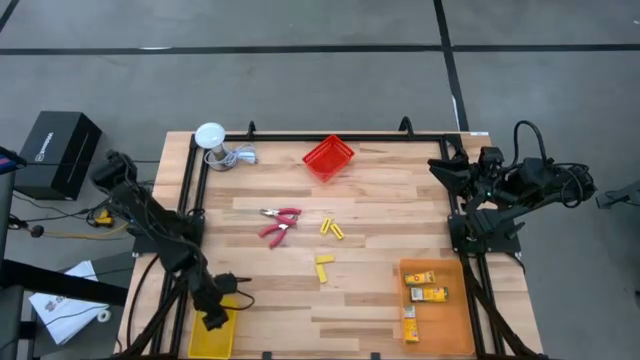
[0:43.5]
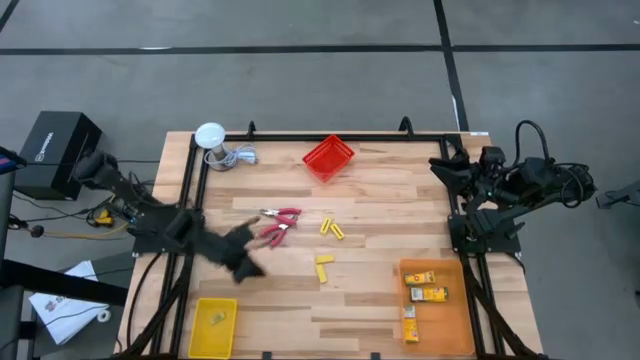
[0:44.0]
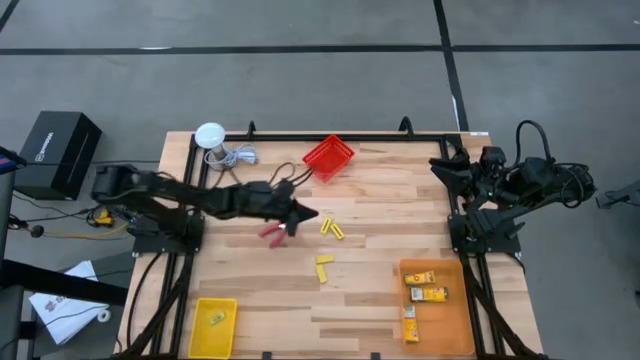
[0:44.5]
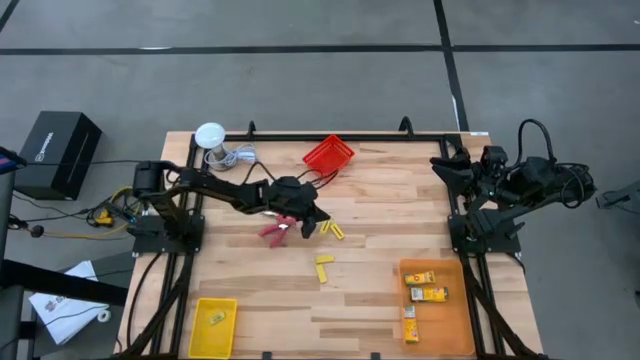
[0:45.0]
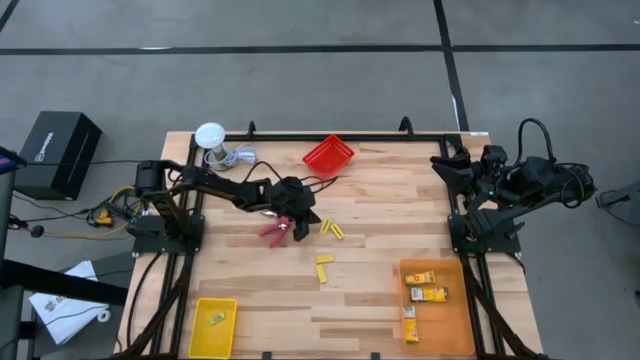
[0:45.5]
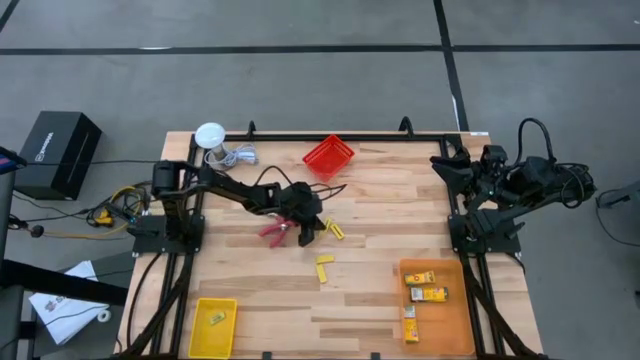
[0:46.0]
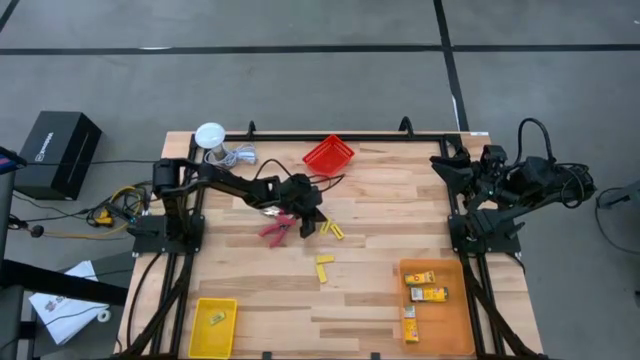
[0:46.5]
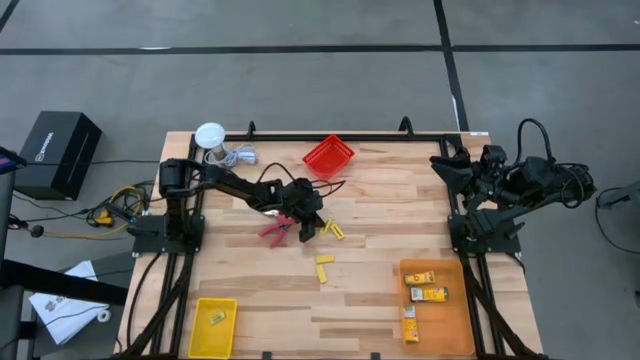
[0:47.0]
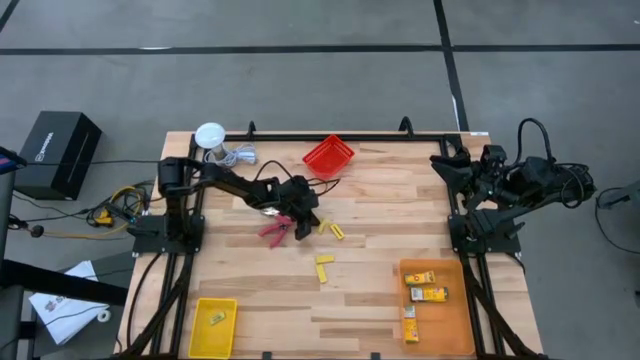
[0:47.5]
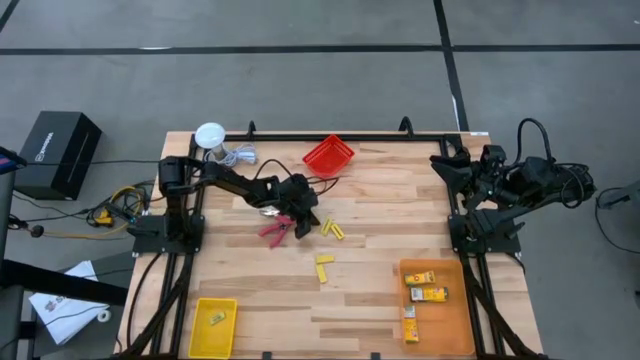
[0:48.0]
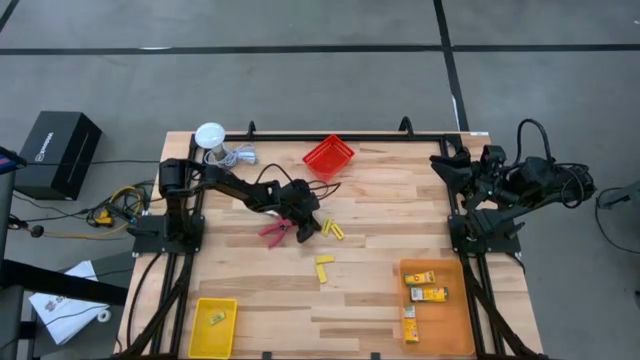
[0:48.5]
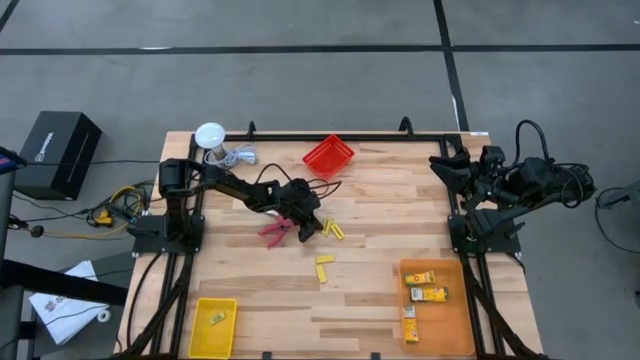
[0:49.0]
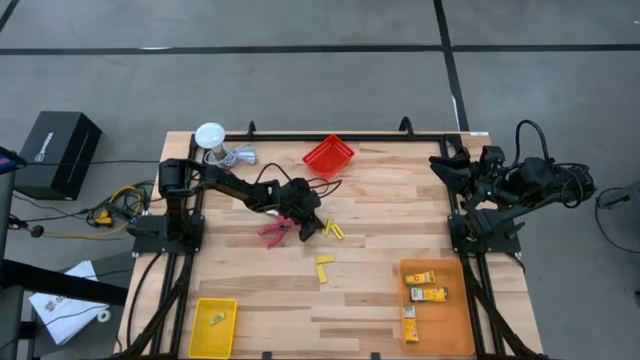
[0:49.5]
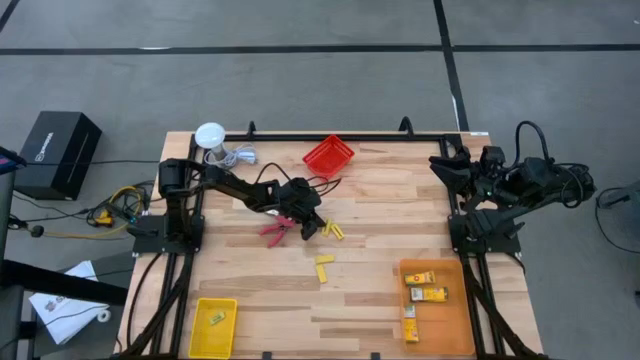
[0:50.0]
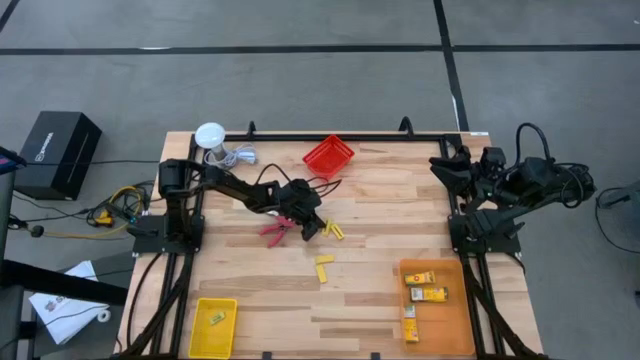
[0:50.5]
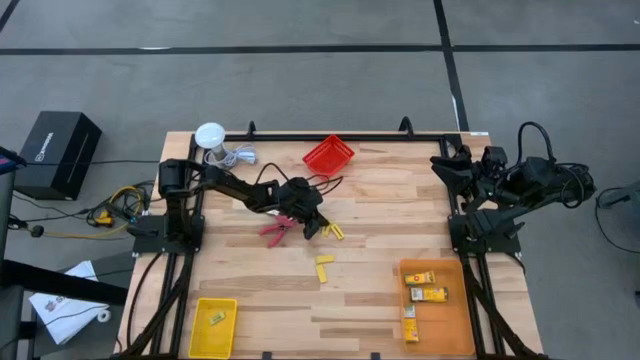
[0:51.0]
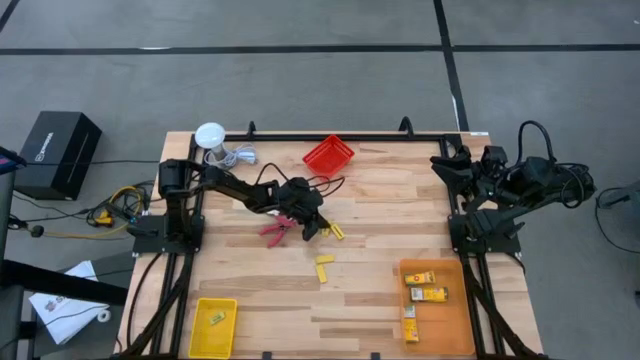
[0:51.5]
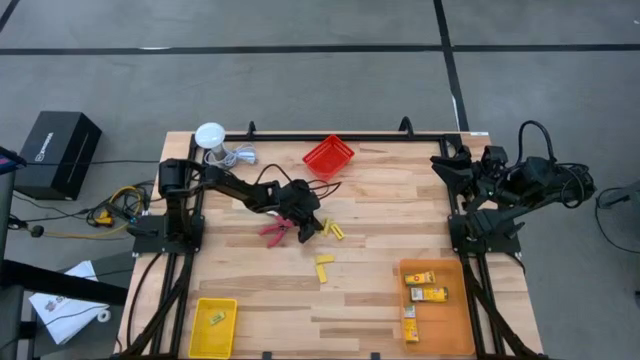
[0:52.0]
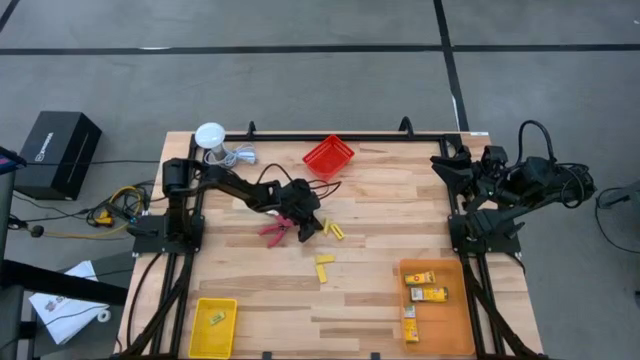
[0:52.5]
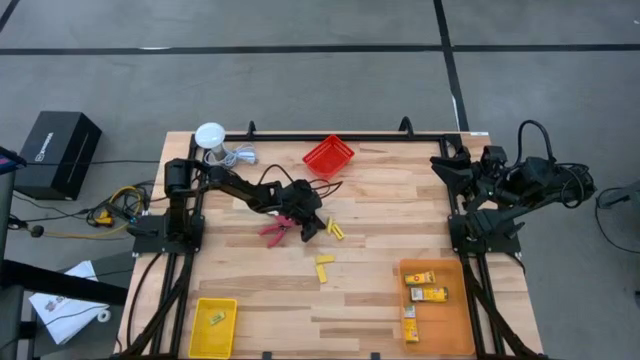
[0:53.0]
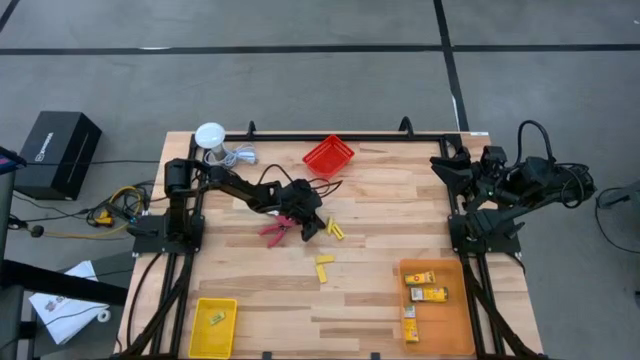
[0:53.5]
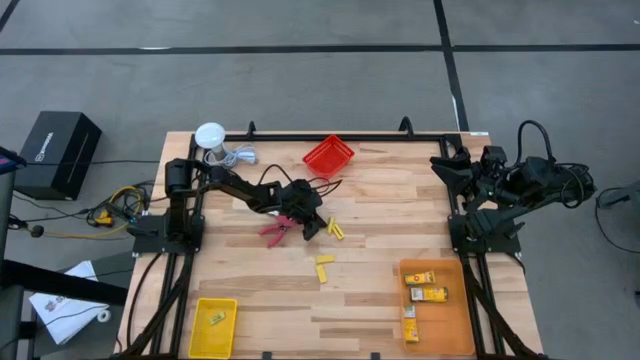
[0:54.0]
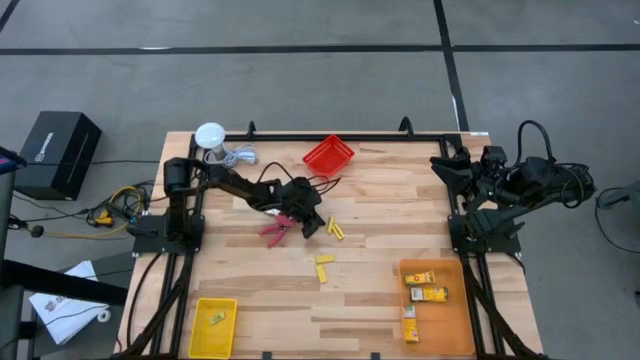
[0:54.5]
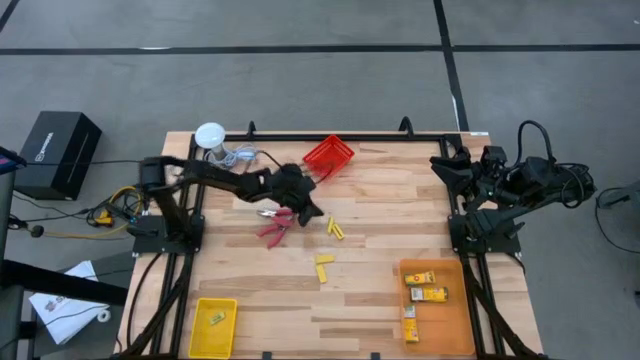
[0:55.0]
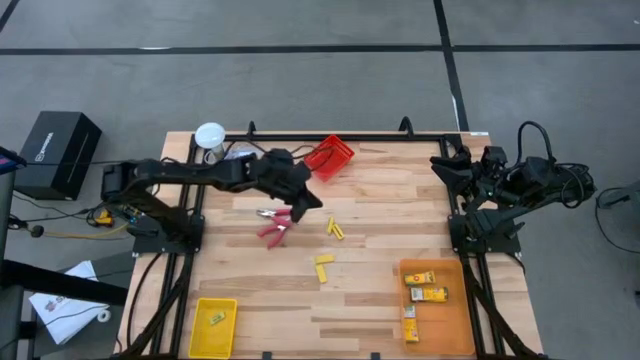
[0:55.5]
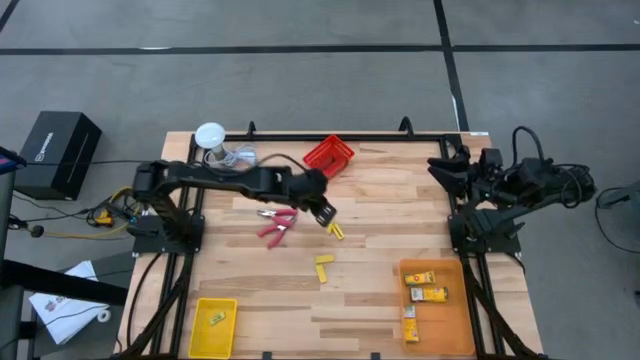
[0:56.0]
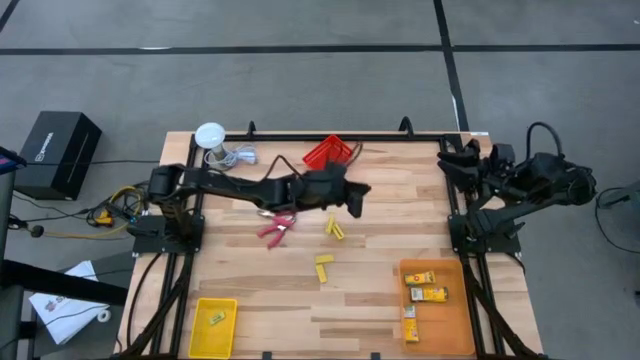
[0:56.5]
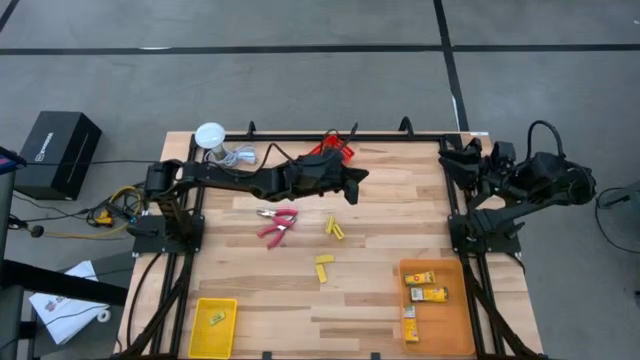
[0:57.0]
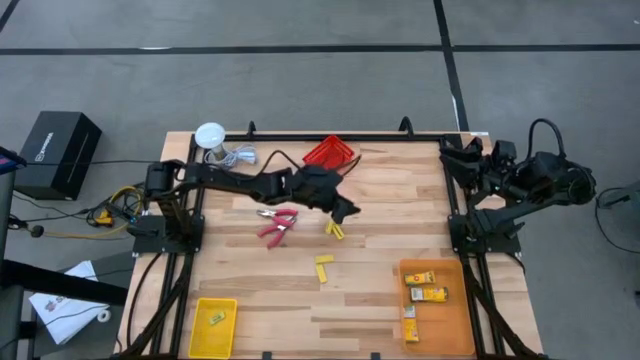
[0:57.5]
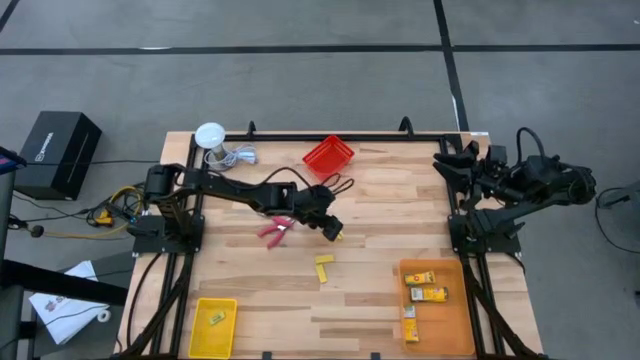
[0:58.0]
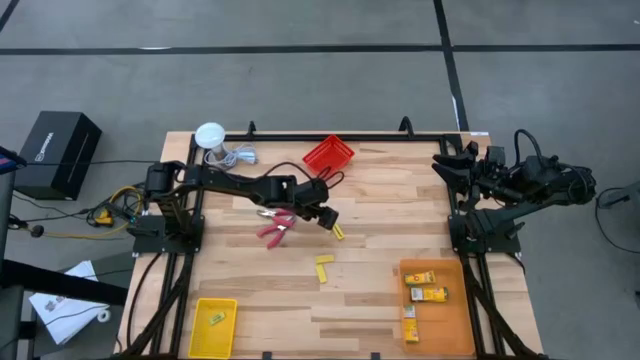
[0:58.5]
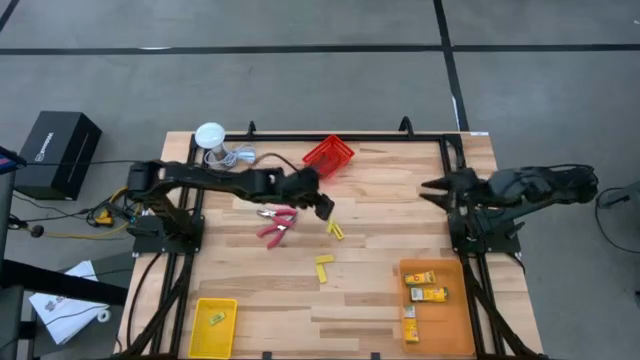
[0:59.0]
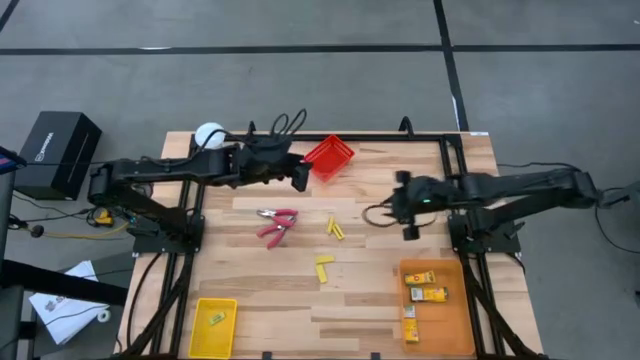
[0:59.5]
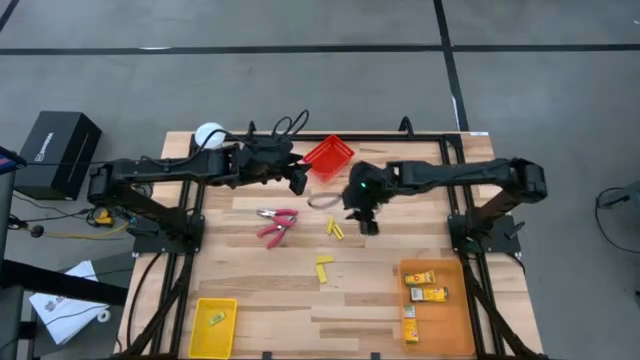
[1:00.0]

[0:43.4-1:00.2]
Task: Pick & Place School Supplies
Put the yellow eraser into the yellow bin

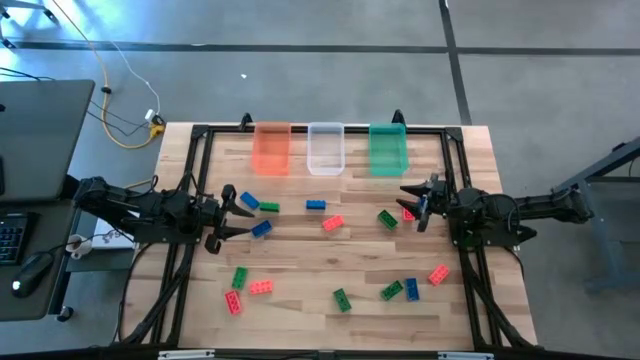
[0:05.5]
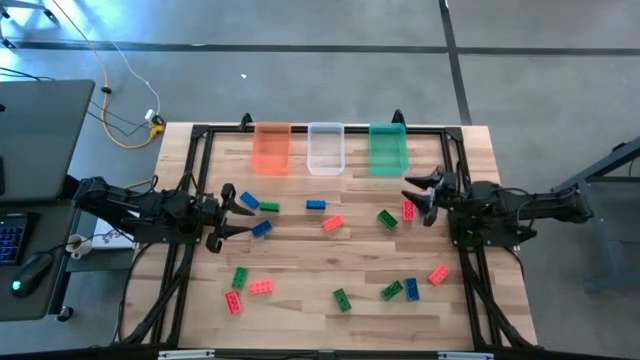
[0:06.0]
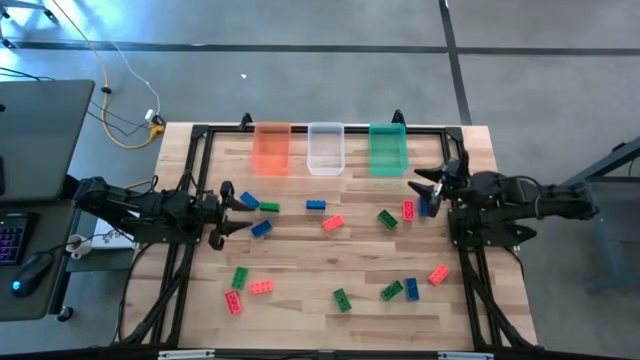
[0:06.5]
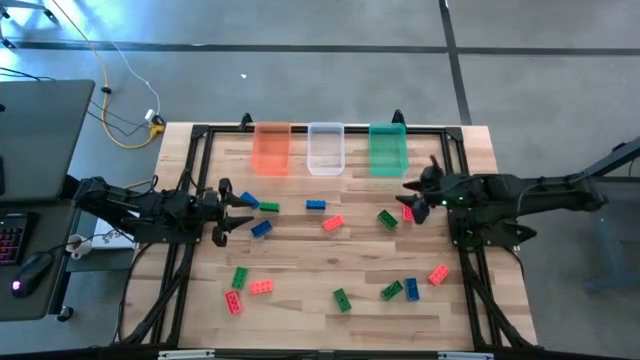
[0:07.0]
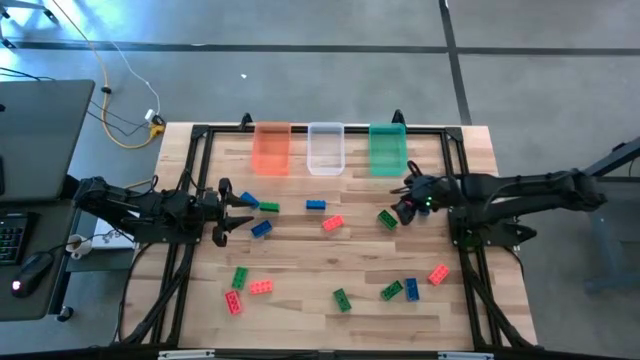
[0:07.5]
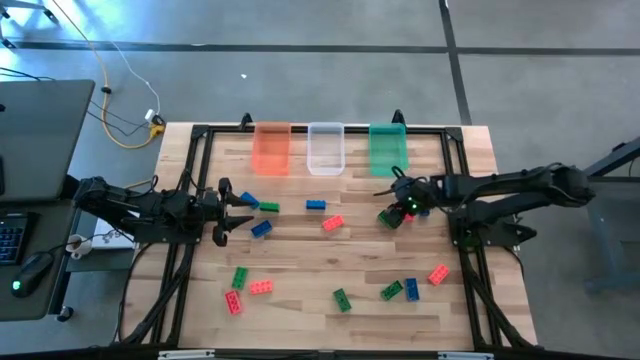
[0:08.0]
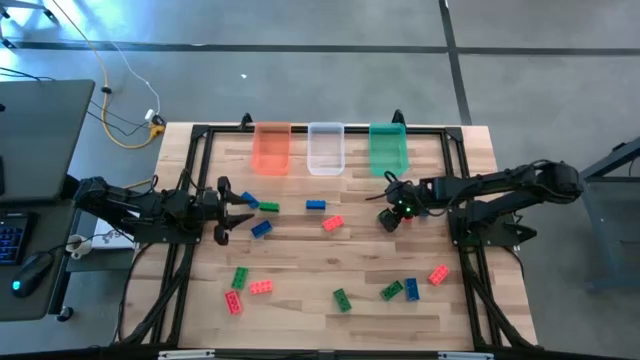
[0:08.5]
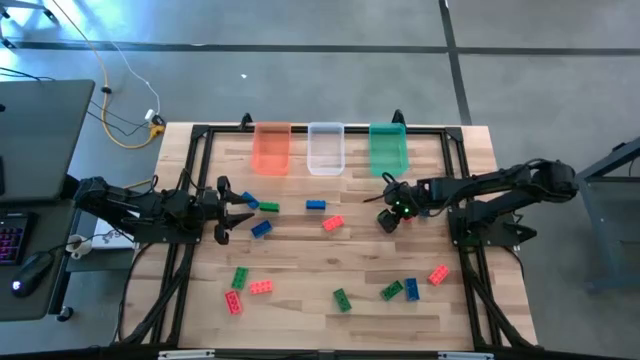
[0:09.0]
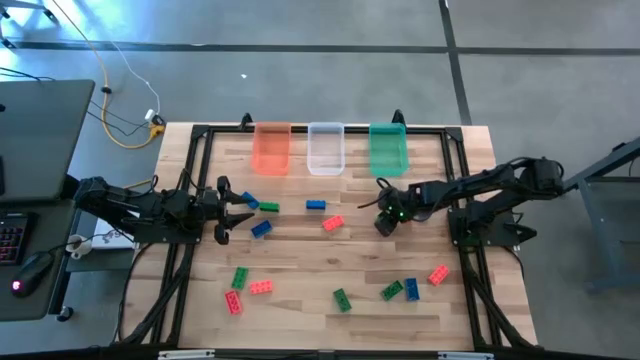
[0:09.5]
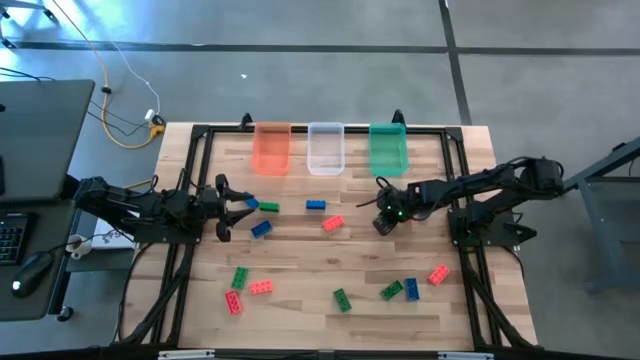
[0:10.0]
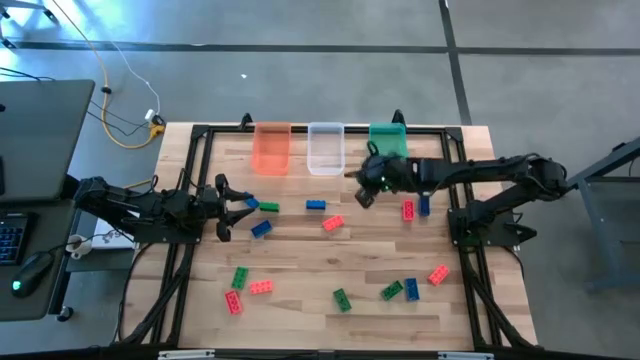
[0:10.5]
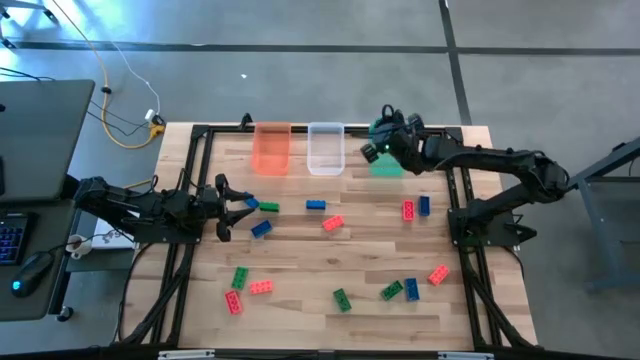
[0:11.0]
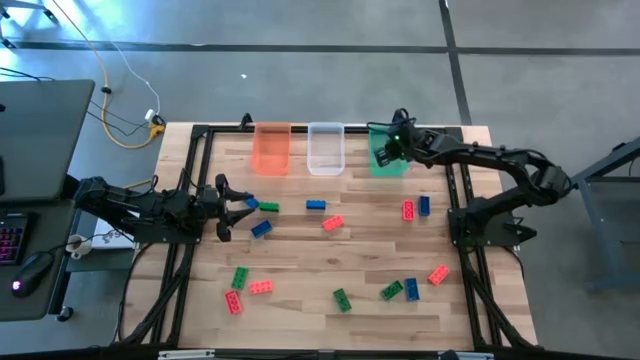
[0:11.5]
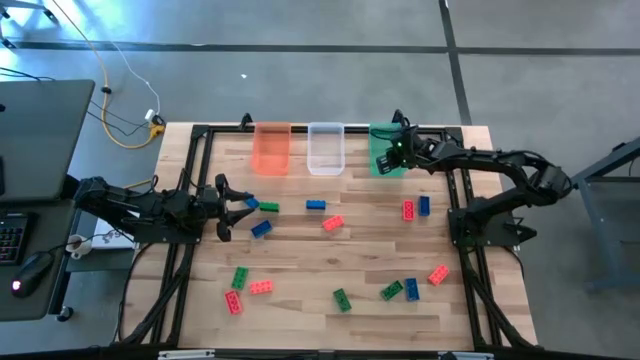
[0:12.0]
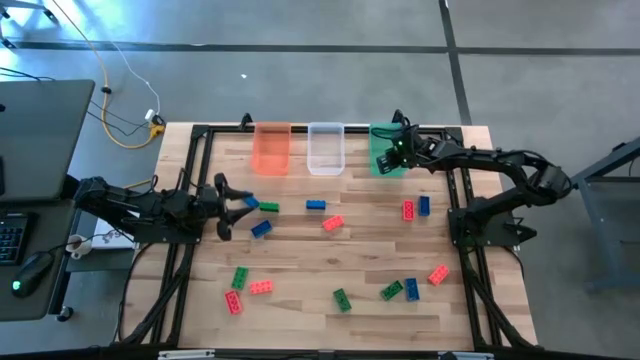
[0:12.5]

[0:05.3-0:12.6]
Task: Sort & place blocks by color
Put the green game piece into the green bin
